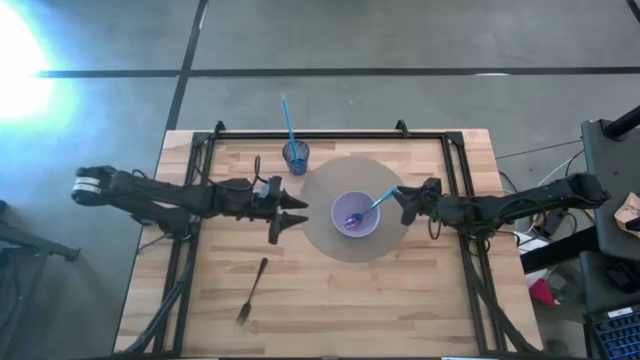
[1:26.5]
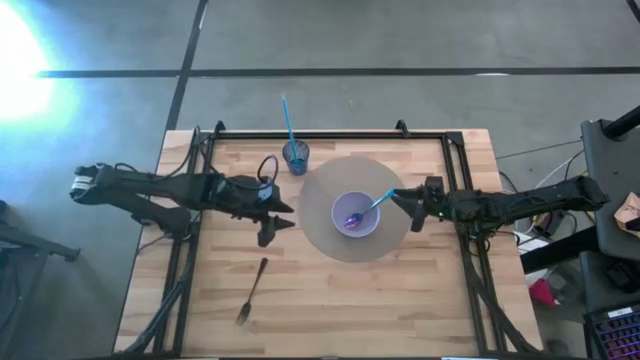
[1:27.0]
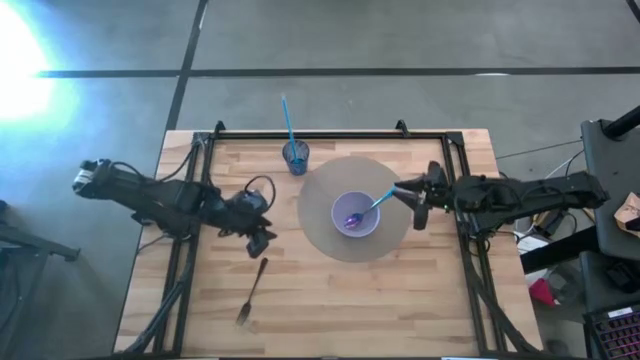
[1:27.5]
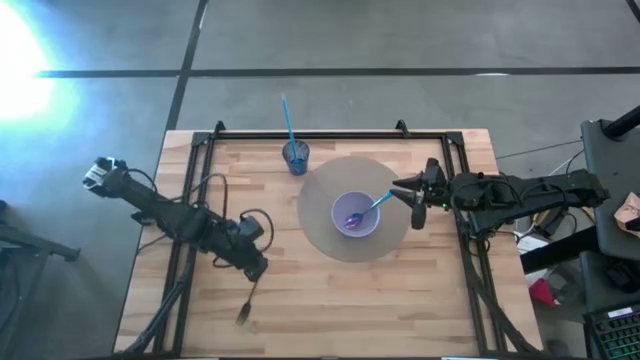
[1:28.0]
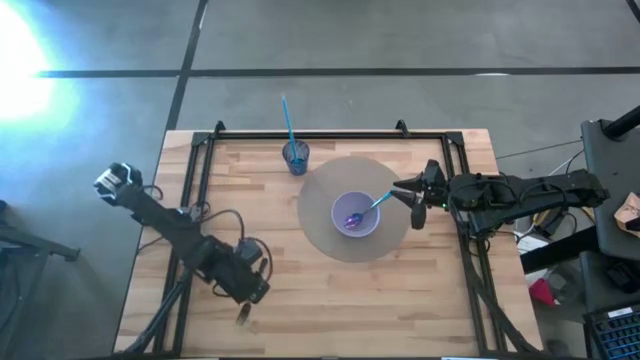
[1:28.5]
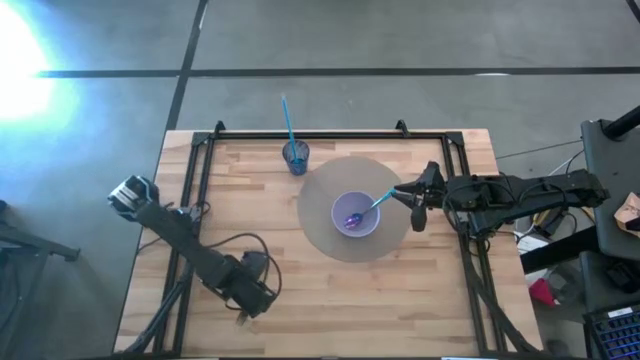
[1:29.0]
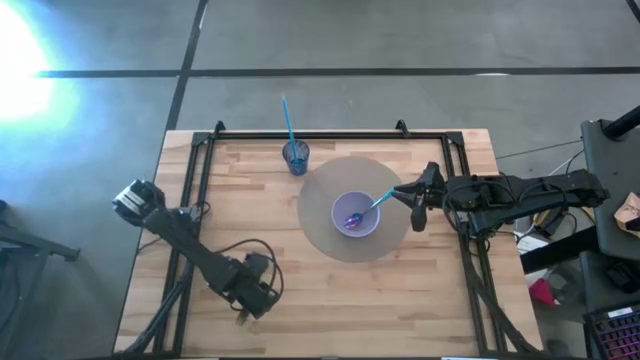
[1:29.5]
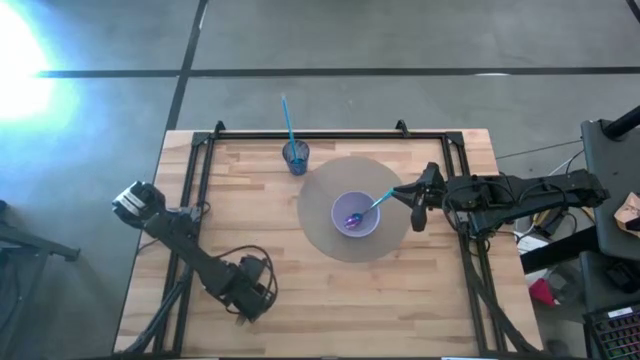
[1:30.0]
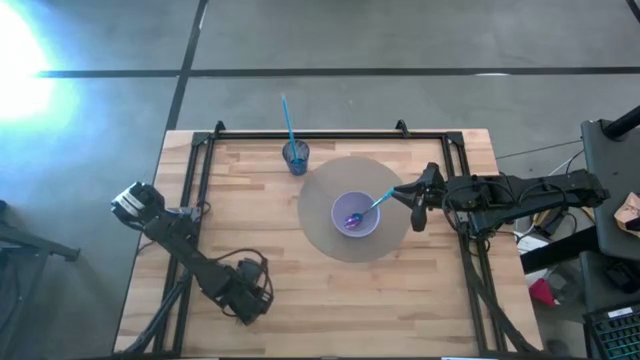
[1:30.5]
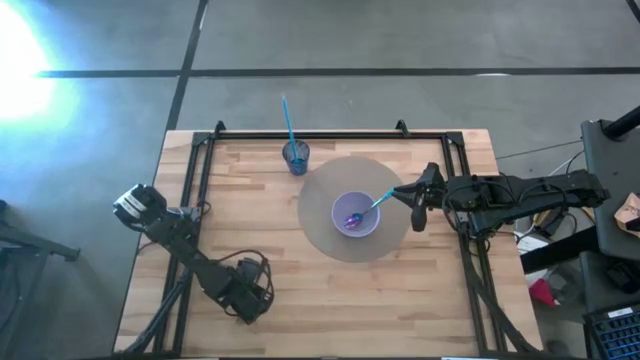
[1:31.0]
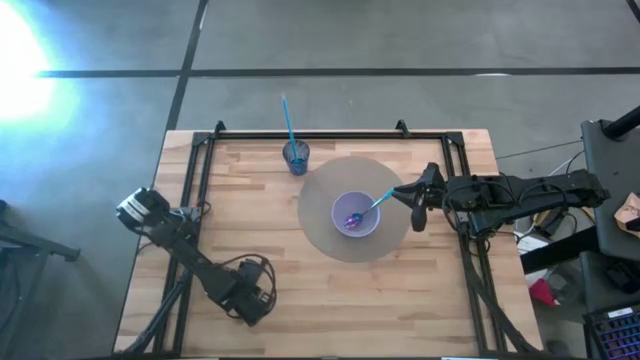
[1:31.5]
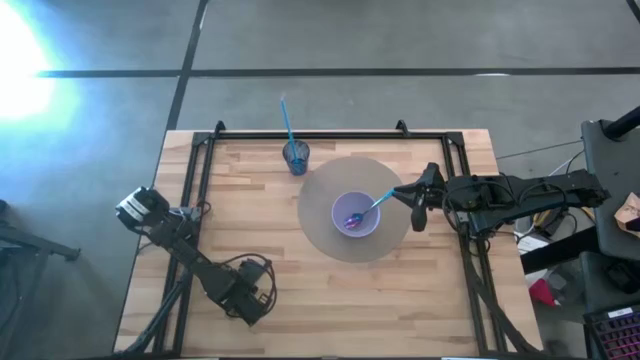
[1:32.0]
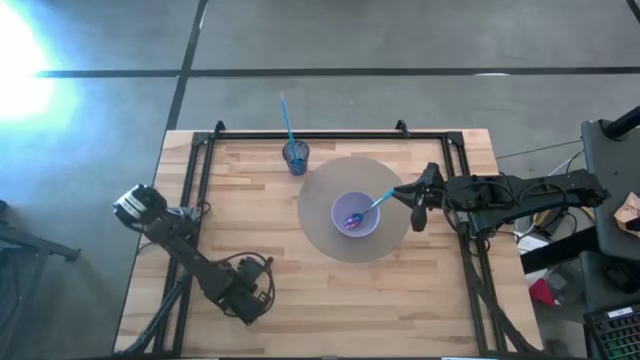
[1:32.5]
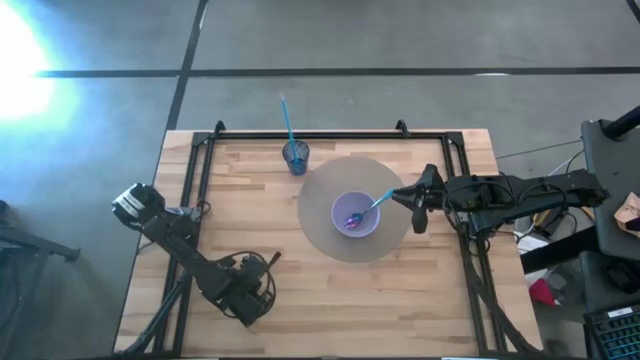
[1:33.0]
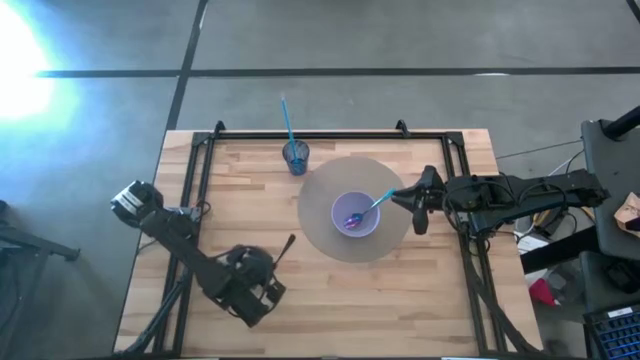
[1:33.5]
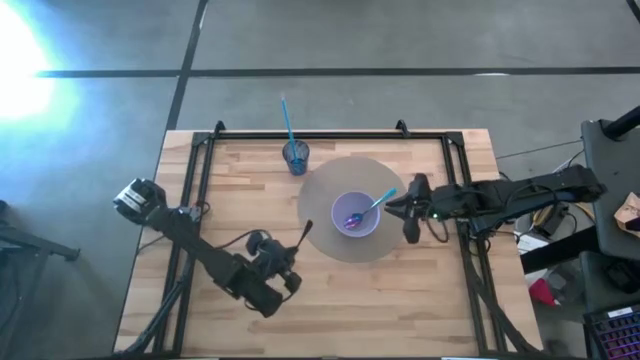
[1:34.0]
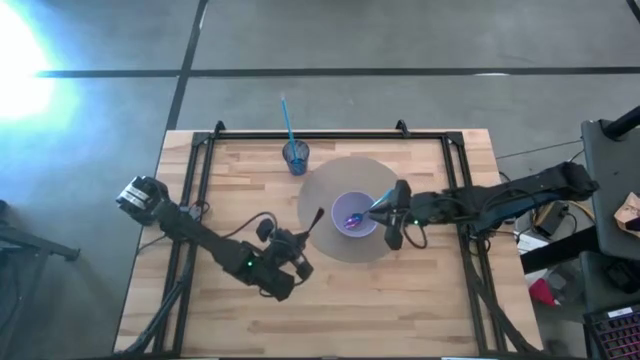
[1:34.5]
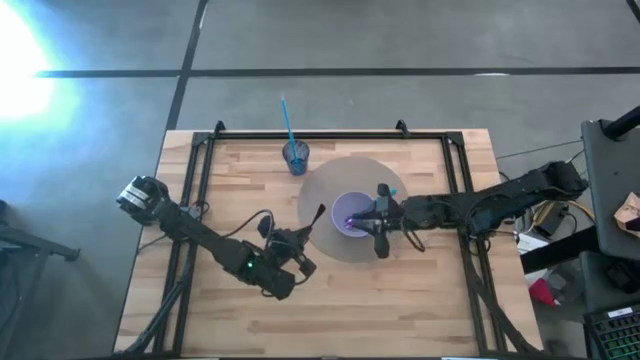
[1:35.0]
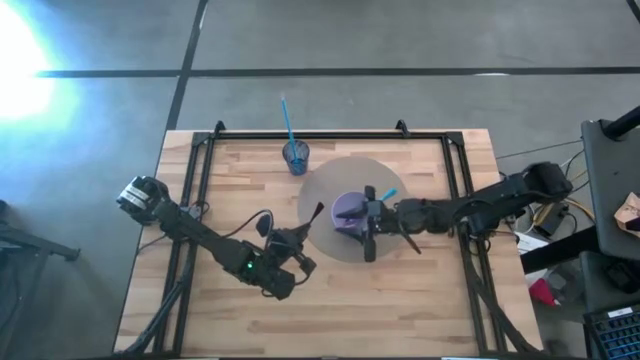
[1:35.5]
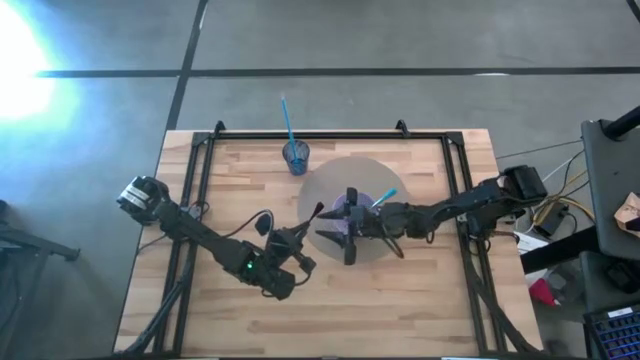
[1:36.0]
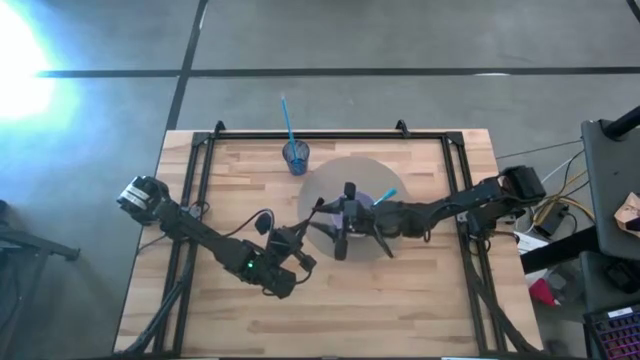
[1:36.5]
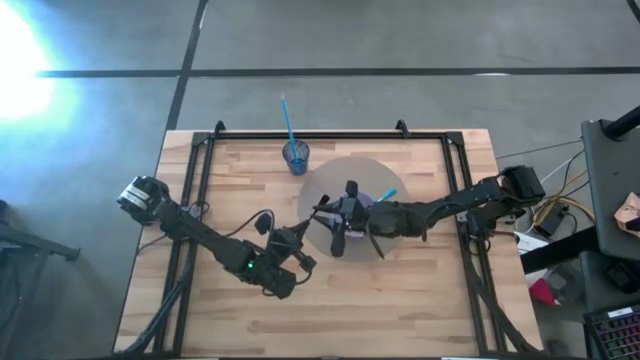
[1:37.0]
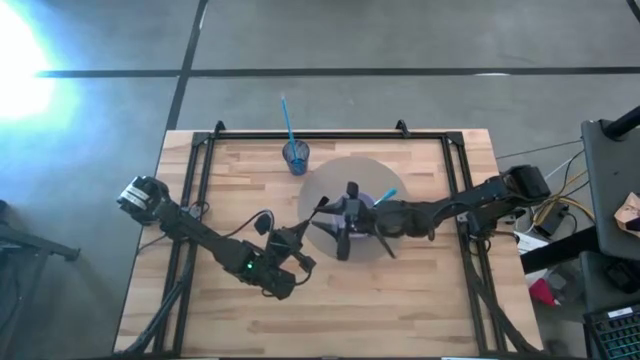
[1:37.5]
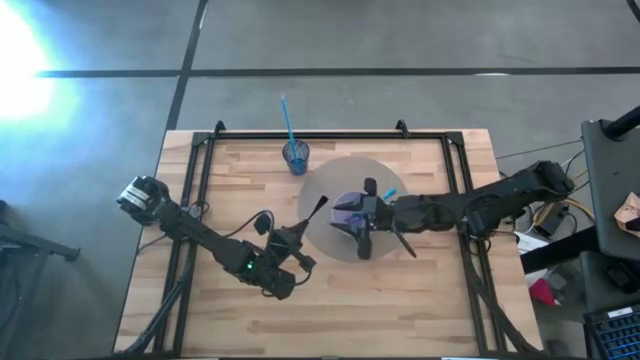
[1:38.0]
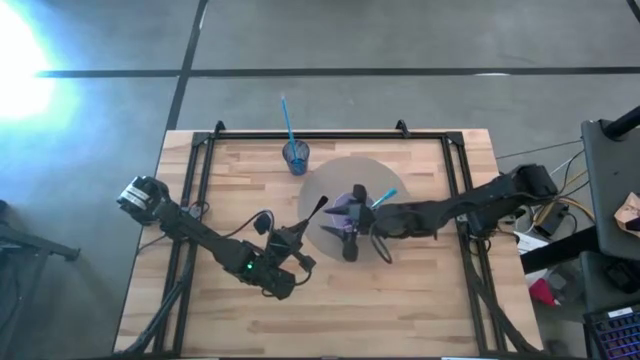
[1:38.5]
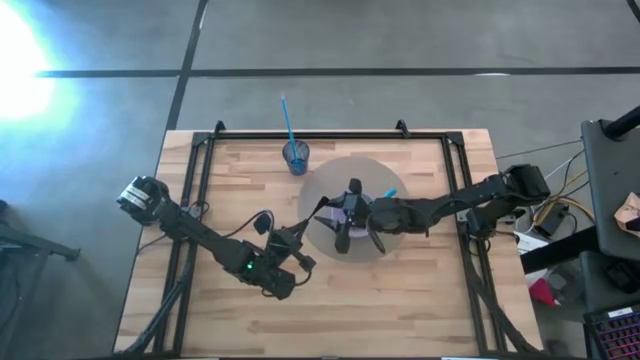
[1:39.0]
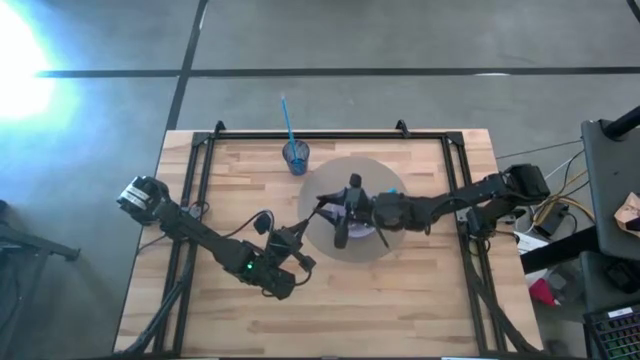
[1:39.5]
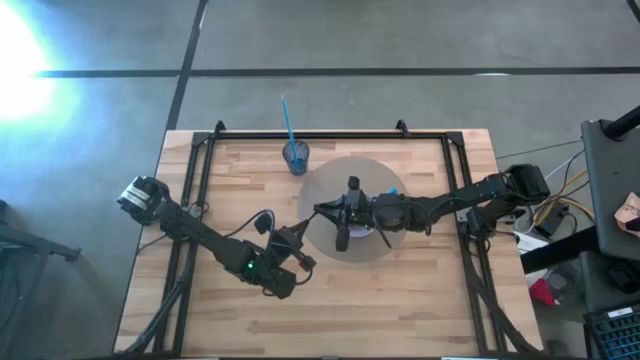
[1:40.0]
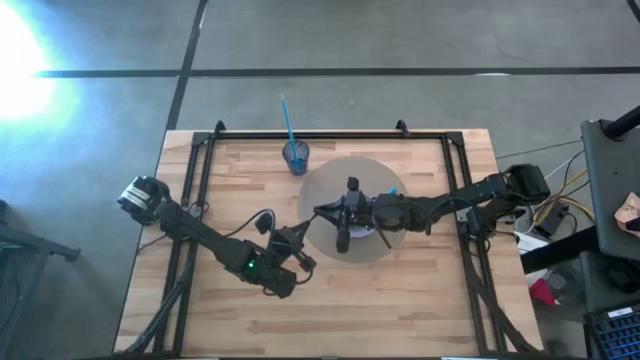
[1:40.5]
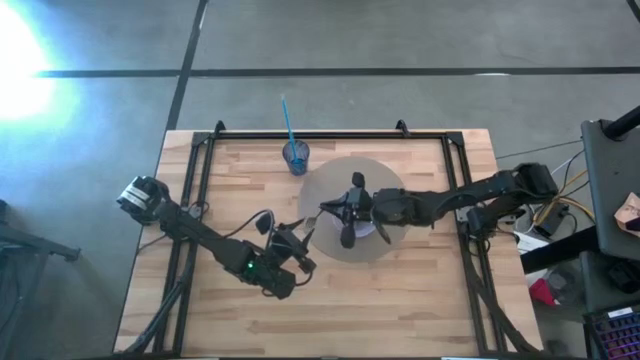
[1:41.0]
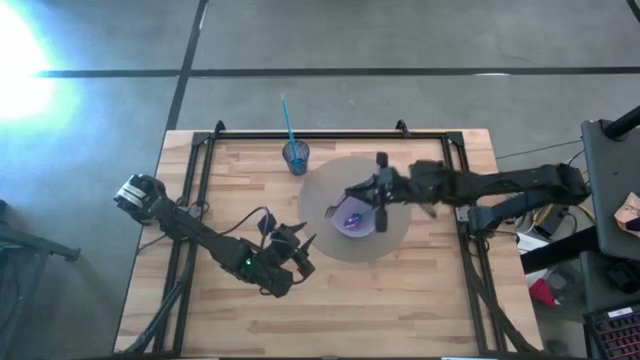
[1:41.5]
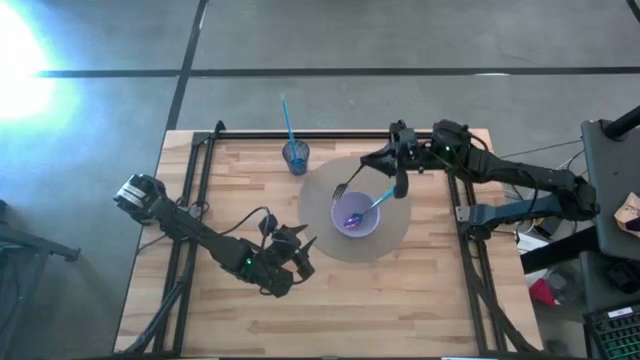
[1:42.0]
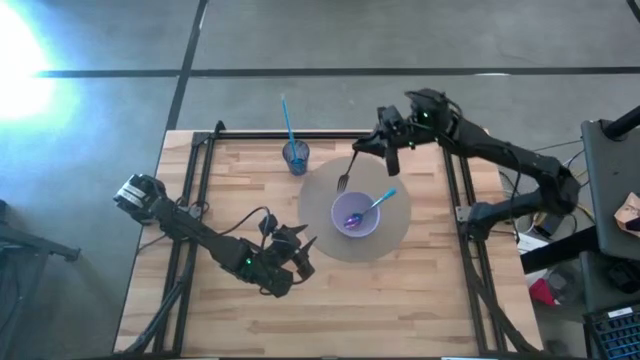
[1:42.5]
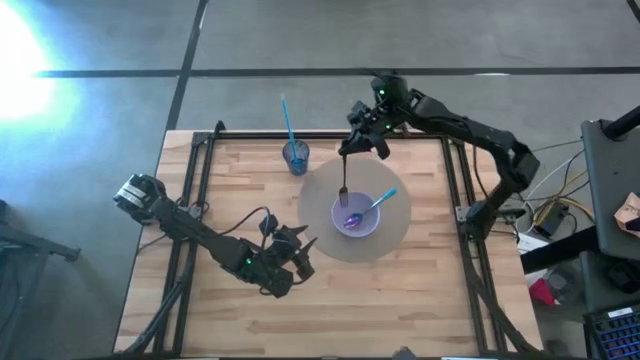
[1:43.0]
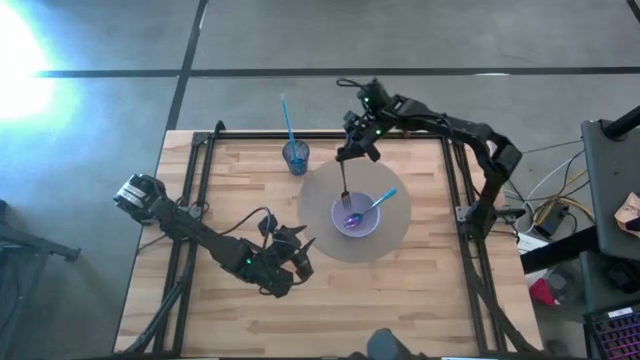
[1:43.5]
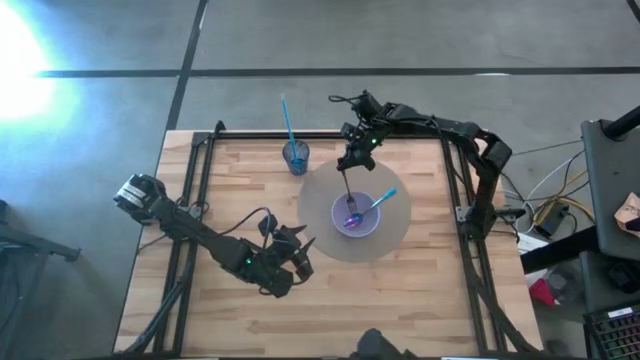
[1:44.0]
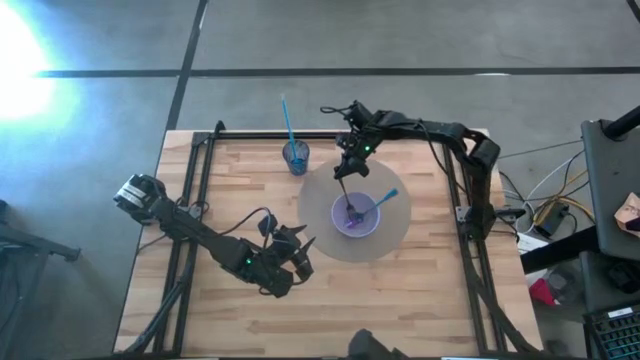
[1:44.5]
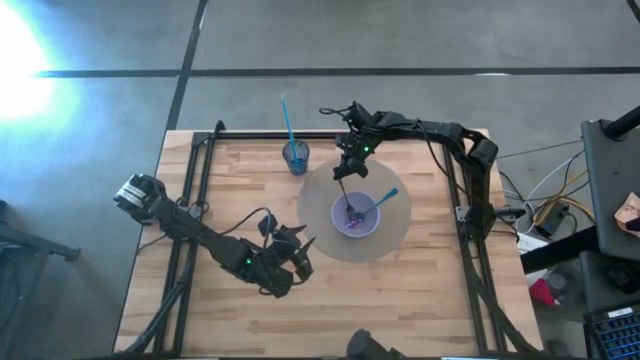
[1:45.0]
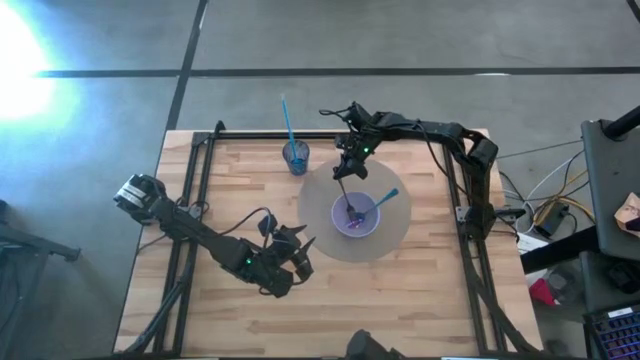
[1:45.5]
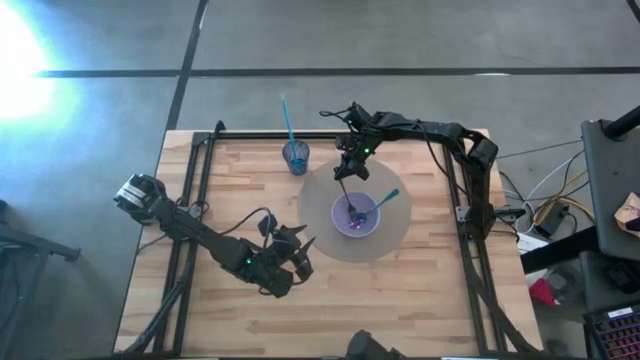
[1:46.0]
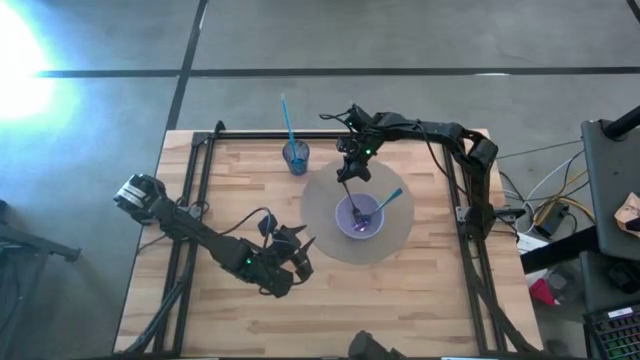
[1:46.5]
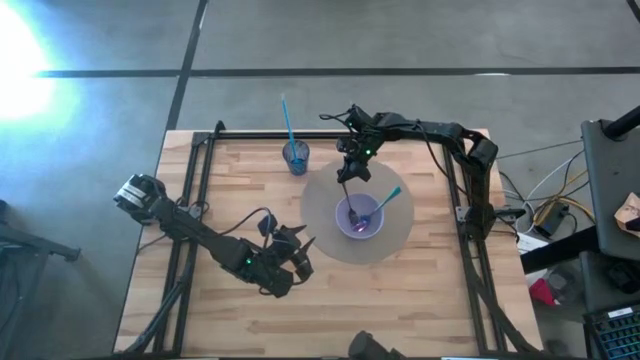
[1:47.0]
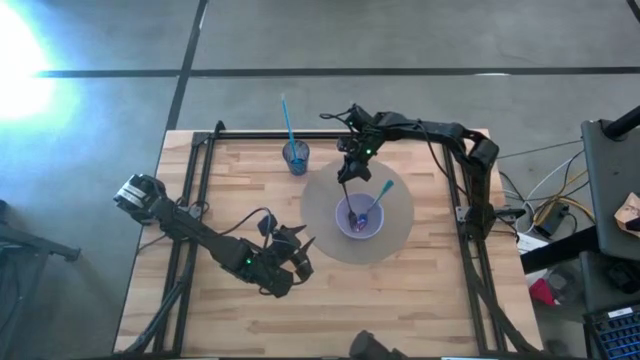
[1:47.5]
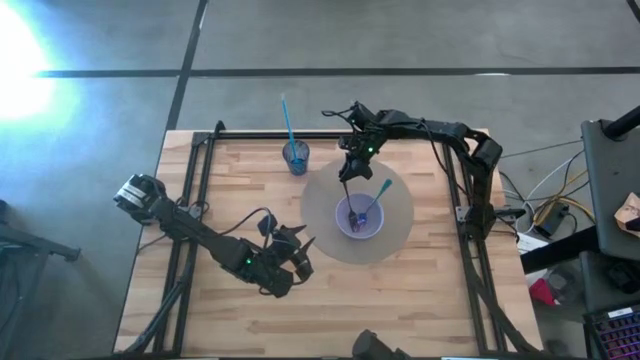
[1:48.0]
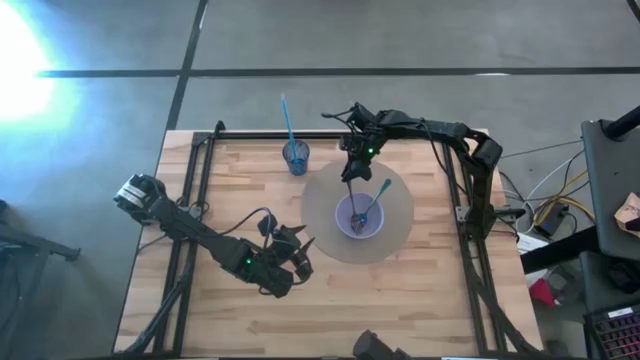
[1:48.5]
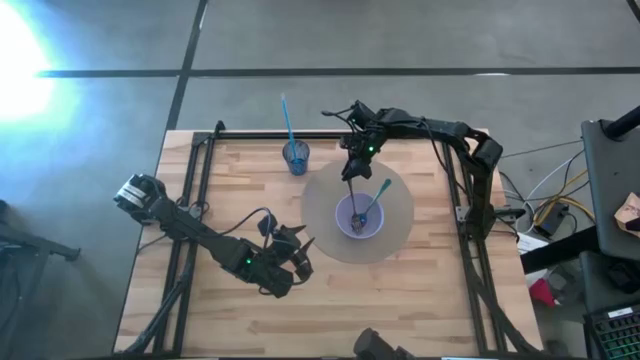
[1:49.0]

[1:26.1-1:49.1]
Task: Pick & Place Utensil
Put the black fork into the purple bowl
